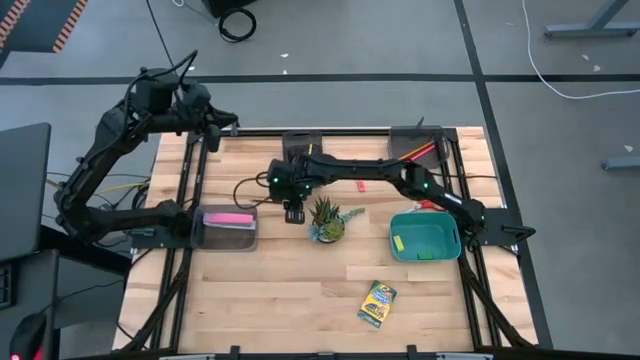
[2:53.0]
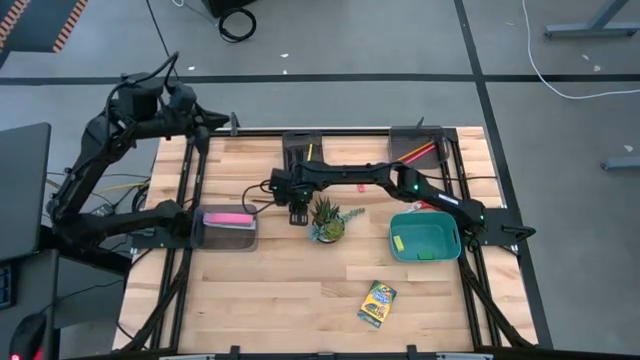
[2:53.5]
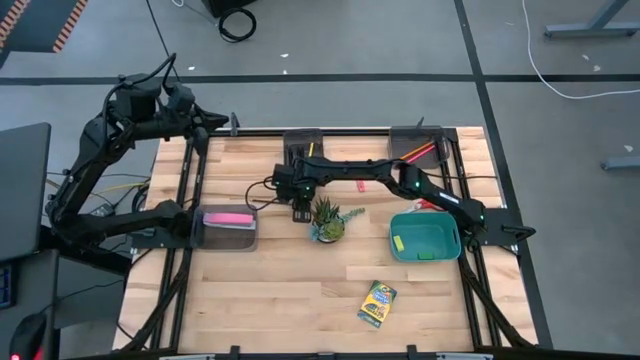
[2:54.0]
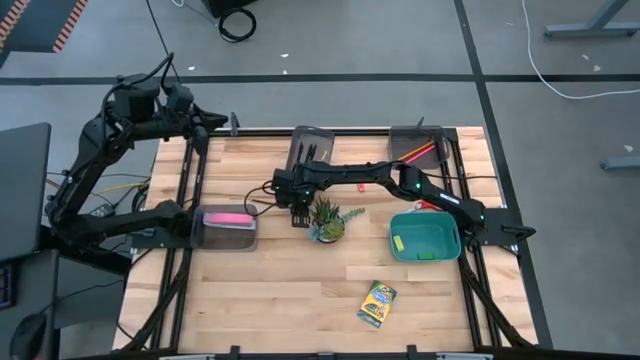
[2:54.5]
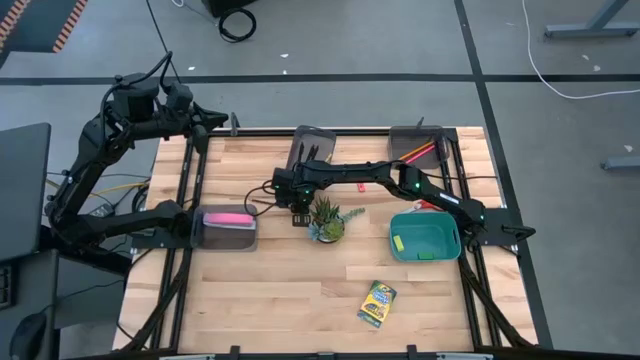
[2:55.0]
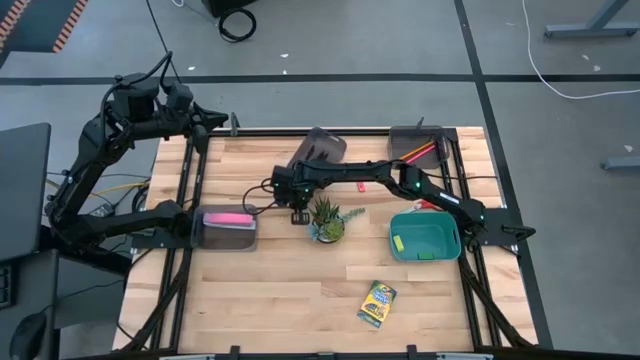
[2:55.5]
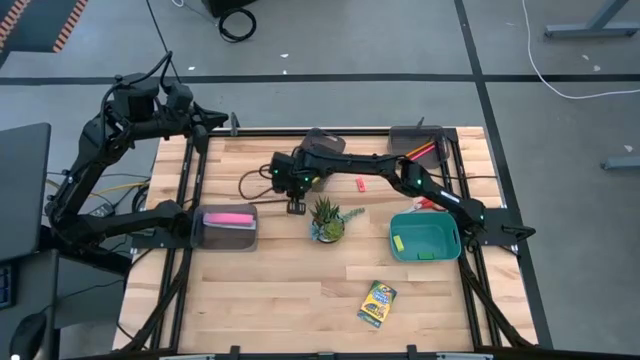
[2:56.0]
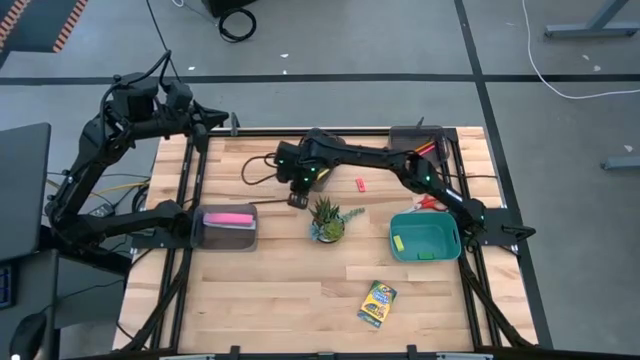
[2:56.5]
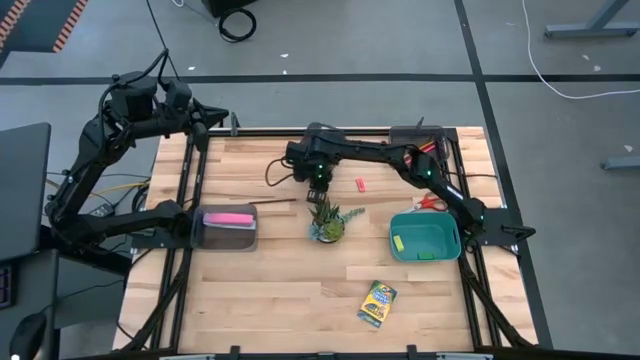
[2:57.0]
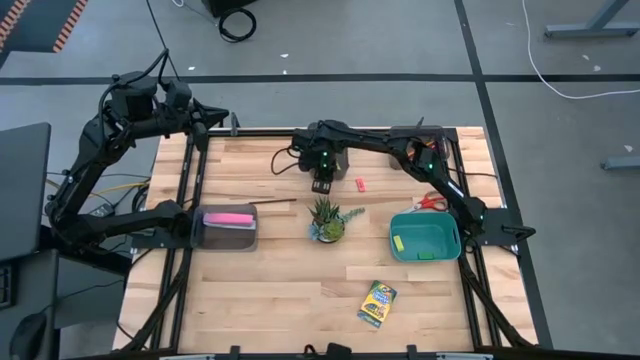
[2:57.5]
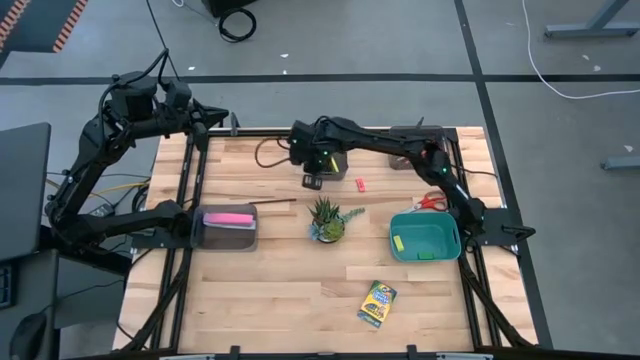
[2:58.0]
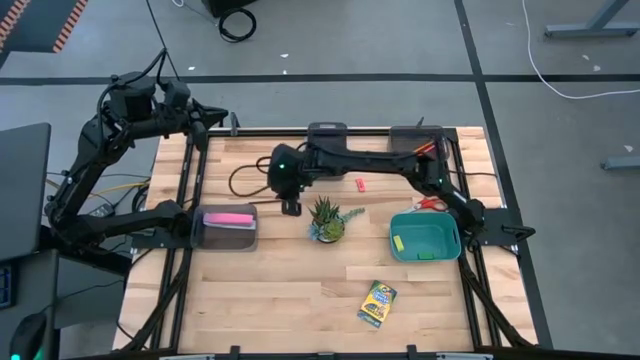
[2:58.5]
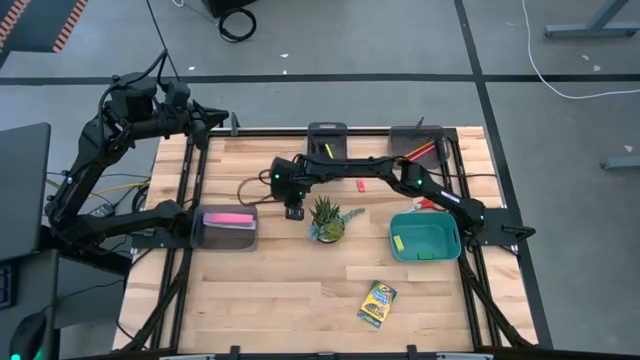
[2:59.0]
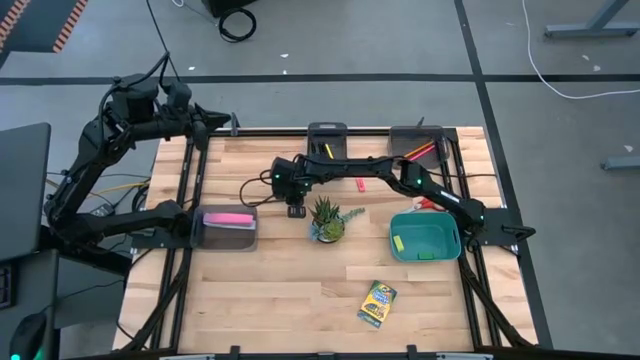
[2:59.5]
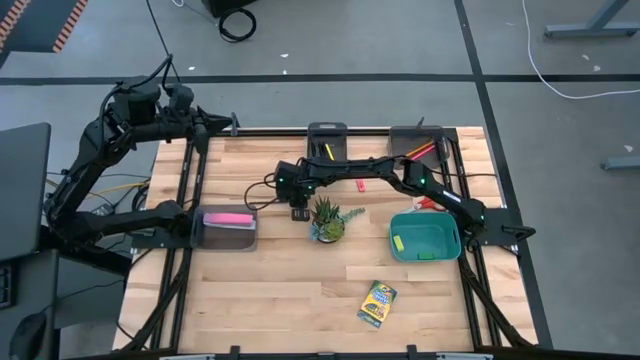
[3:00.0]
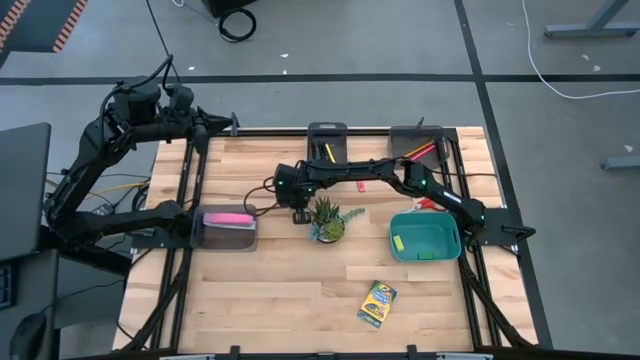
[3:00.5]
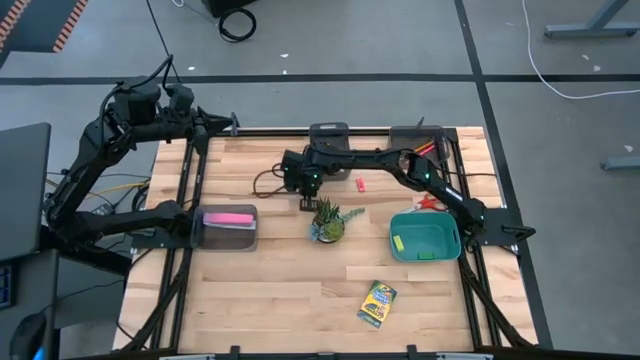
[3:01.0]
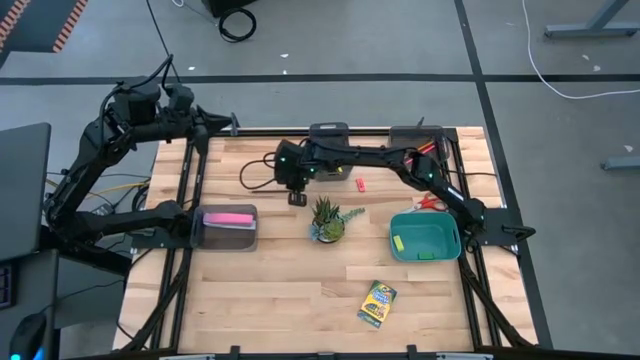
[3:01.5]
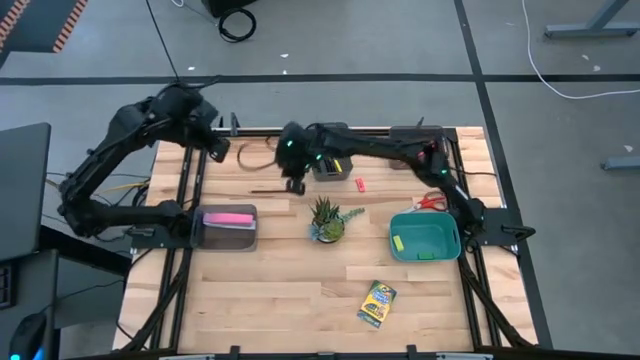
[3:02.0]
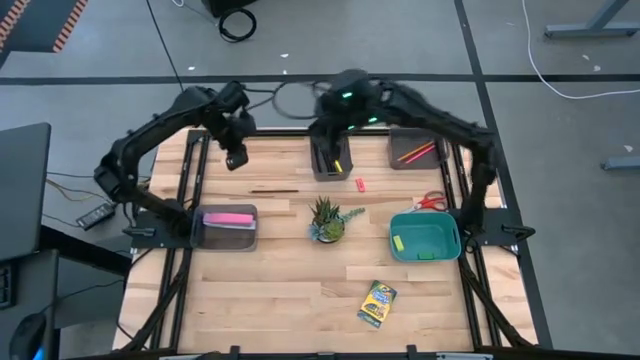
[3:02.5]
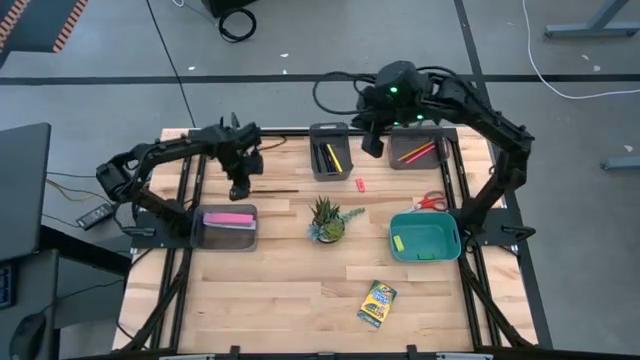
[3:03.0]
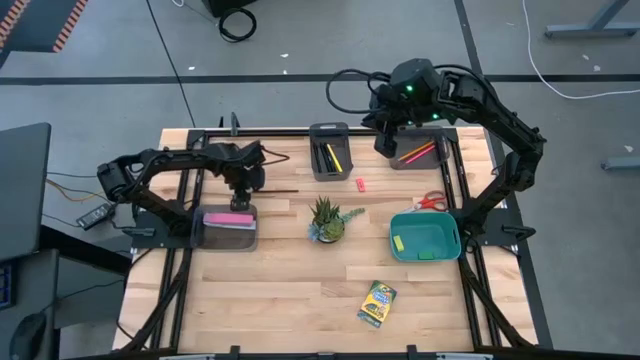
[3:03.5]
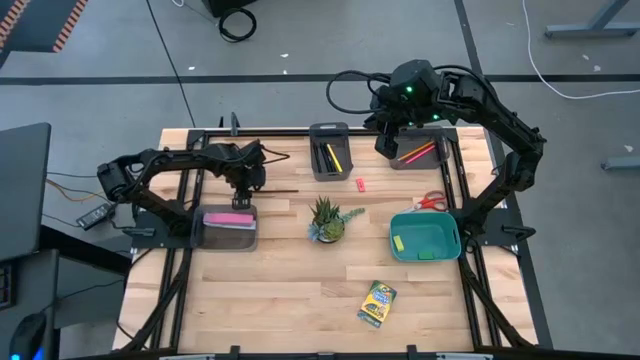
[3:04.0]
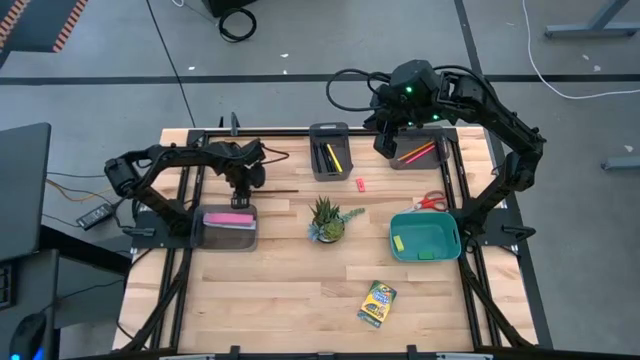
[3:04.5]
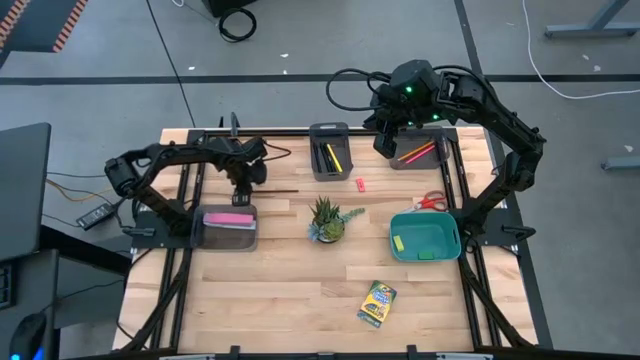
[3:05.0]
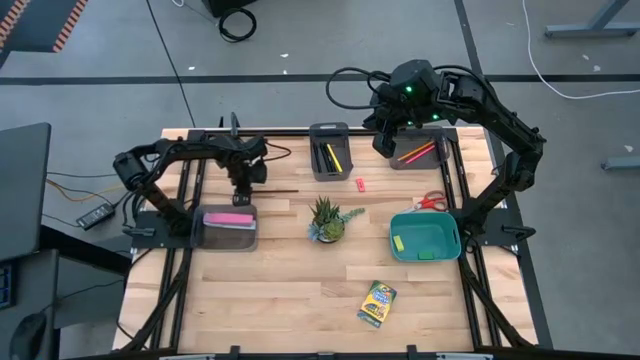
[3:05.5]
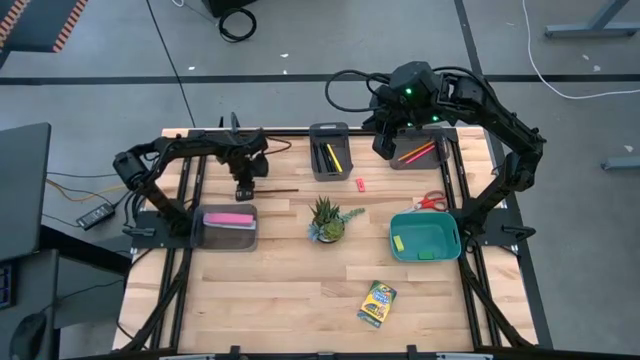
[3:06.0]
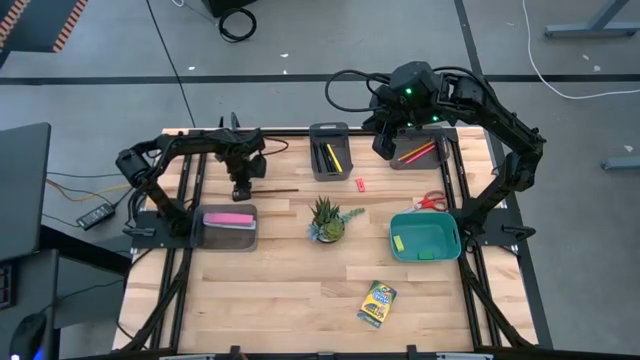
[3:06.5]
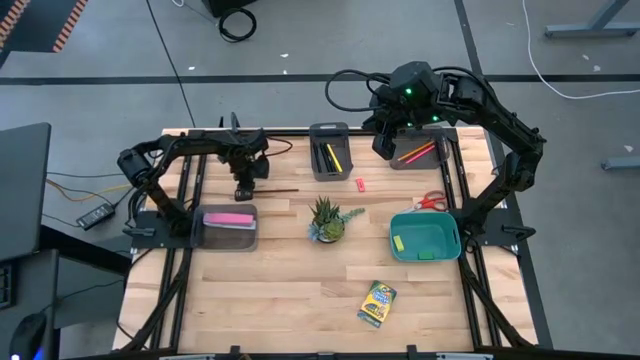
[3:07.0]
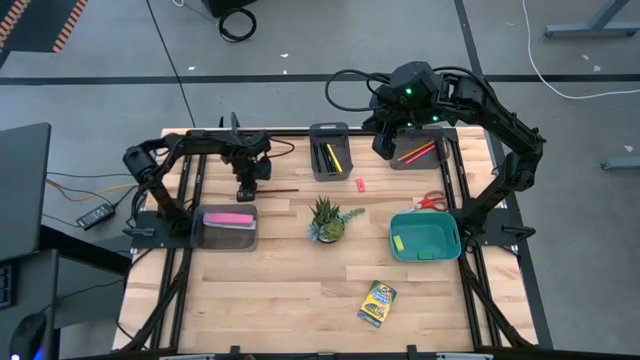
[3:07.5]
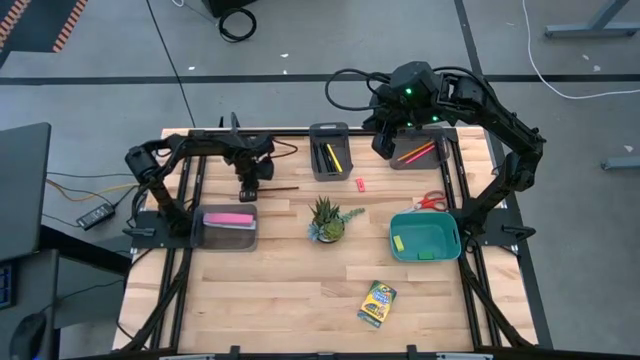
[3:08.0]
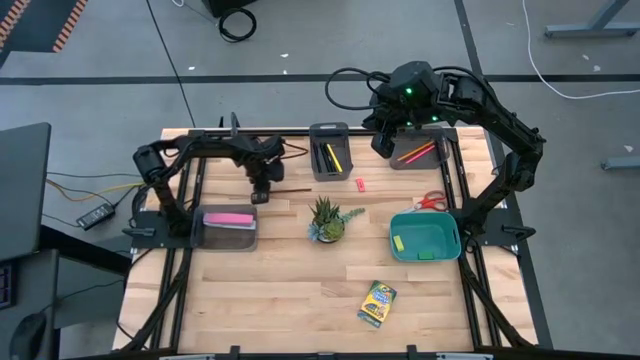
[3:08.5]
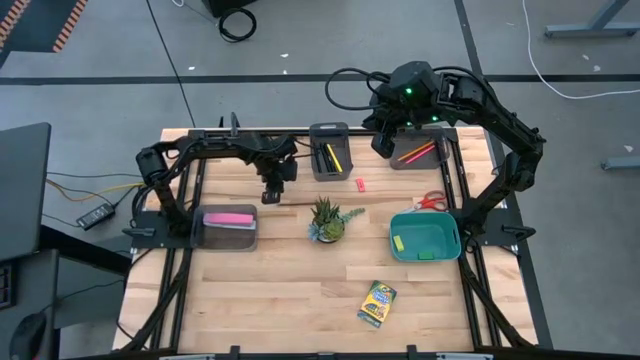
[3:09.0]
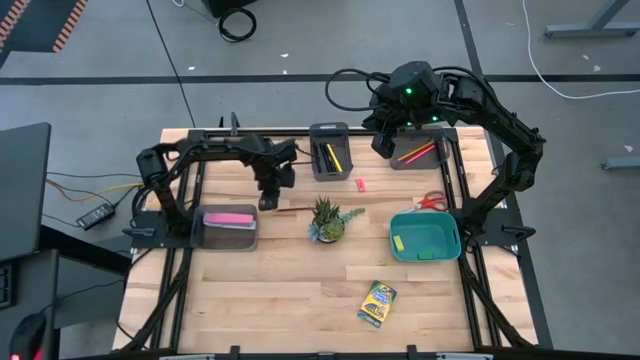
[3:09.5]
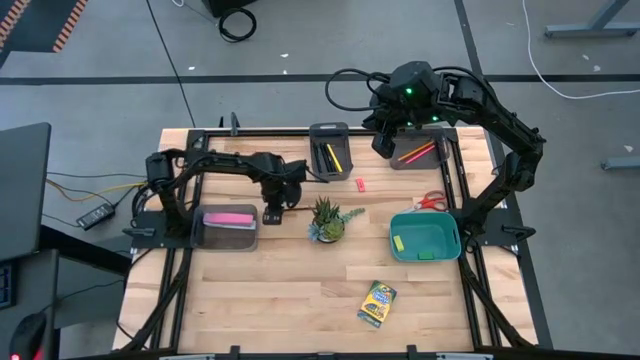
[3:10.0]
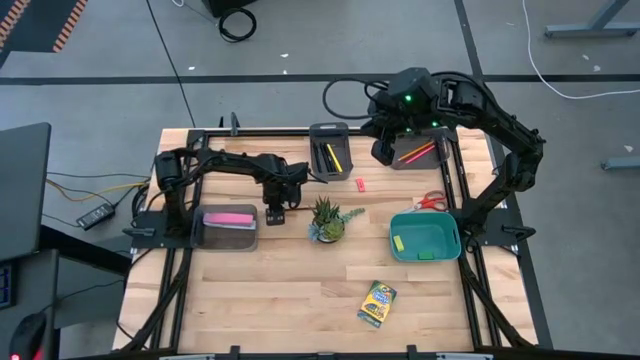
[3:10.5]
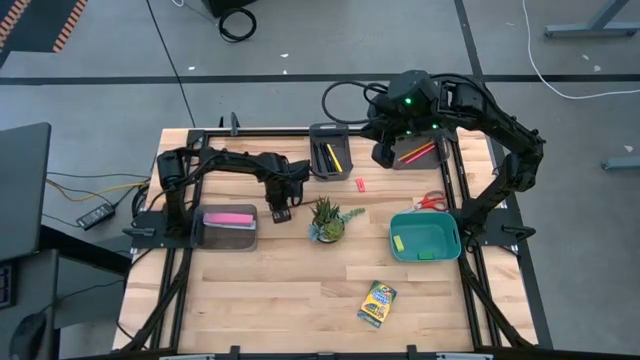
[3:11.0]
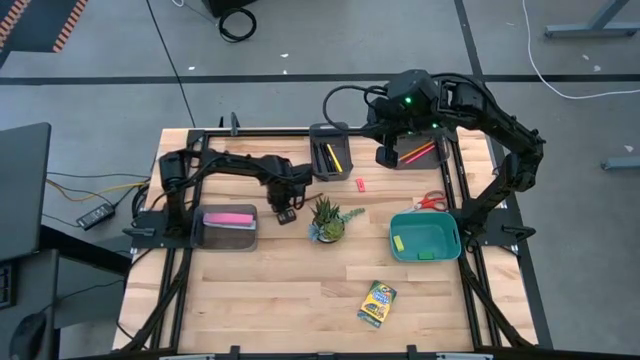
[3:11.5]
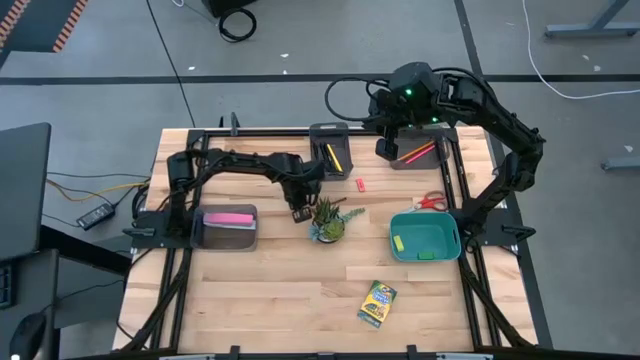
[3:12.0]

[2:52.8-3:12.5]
Task: Sort crayons/erasers/pens/pencils in bins
Put the brown pencil into the right black bin

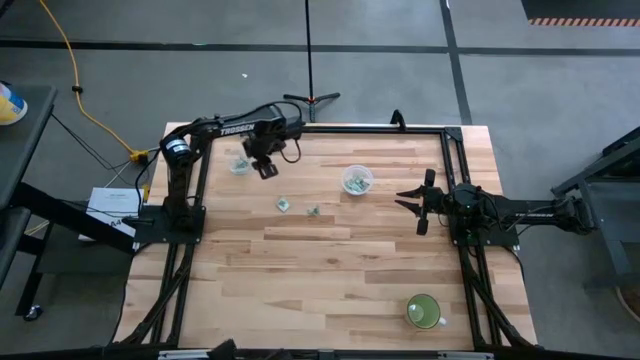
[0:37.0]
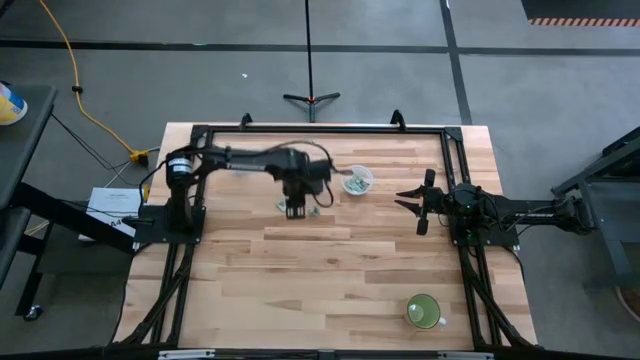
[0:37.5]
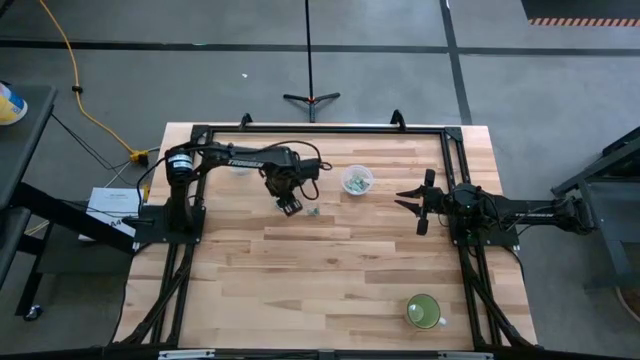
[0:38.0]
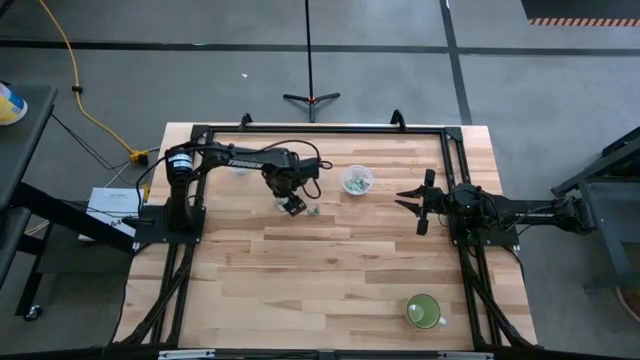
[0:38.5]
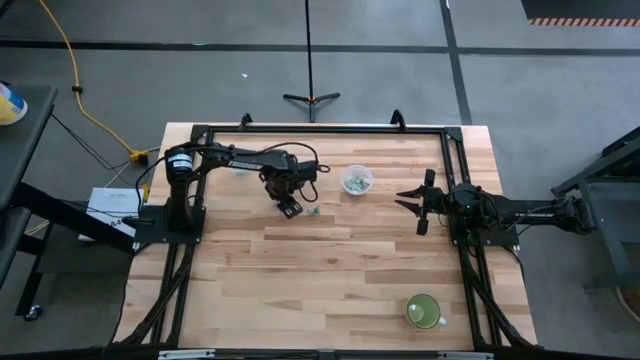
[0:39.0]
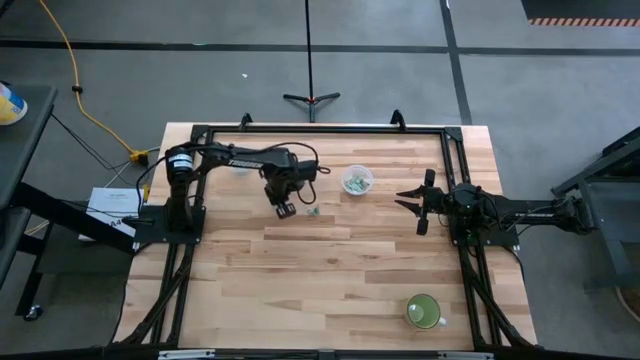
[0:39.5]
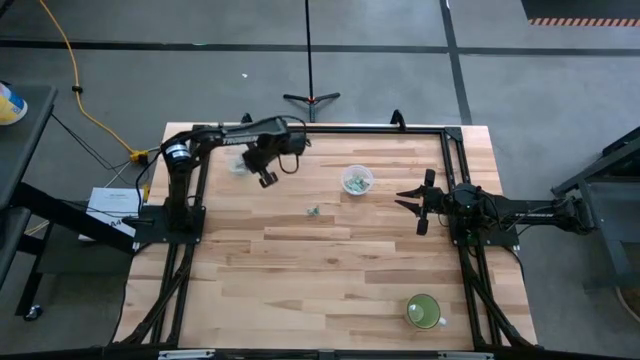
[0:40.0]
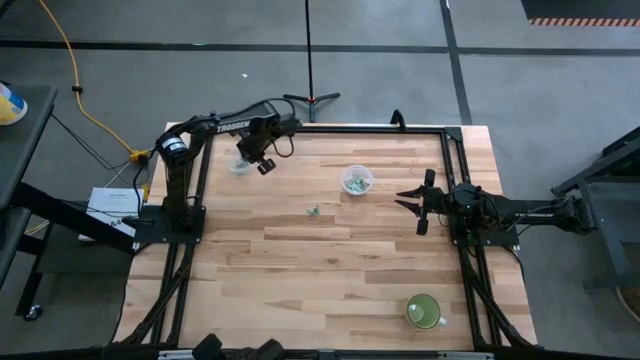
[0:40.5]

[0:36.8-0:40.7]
Task: Pick and place Stevia / Truvia into bins
Put the stevia packet into the top transparent container
